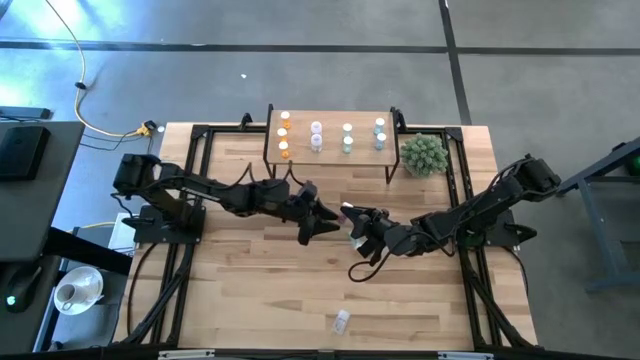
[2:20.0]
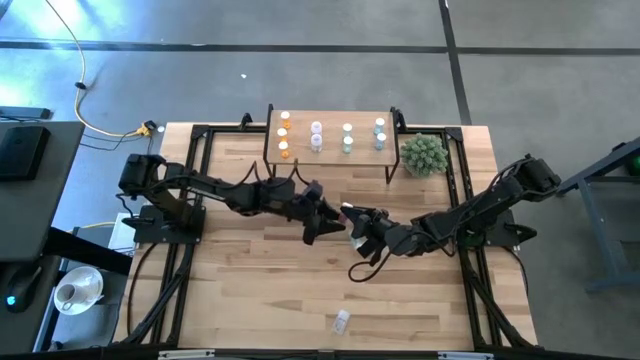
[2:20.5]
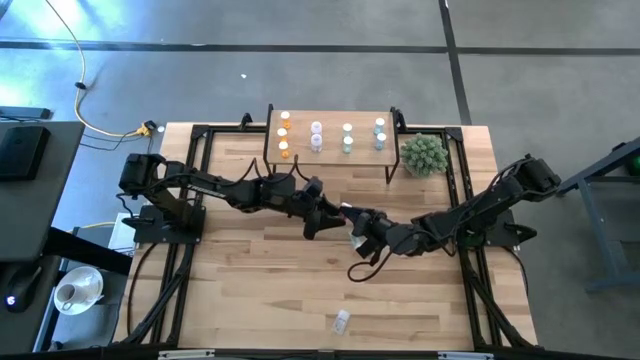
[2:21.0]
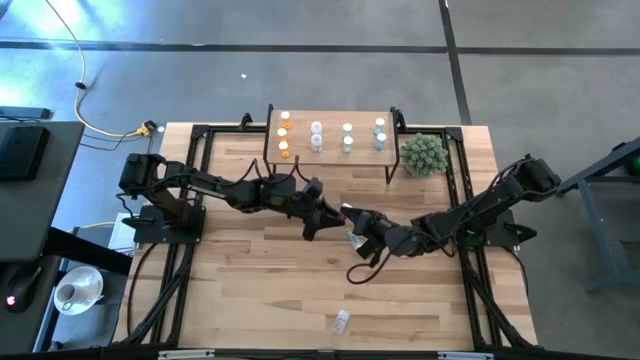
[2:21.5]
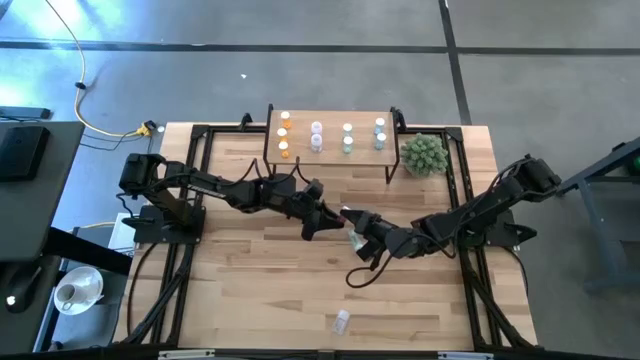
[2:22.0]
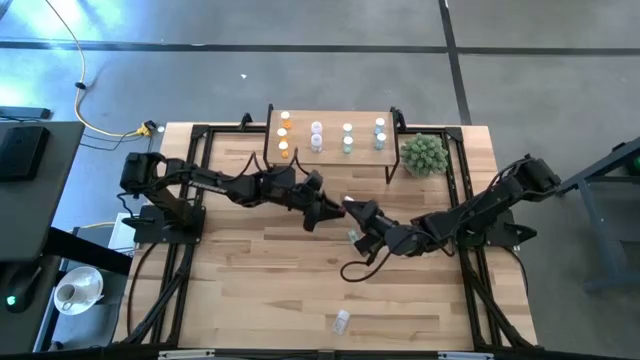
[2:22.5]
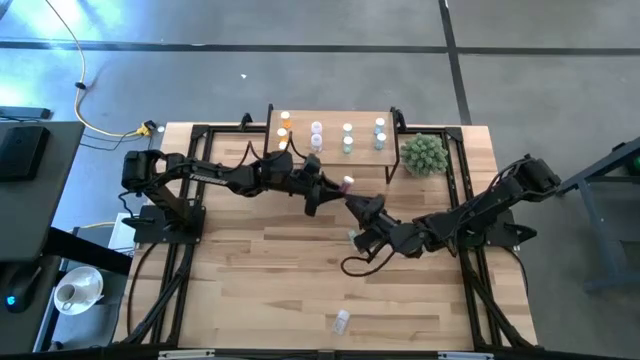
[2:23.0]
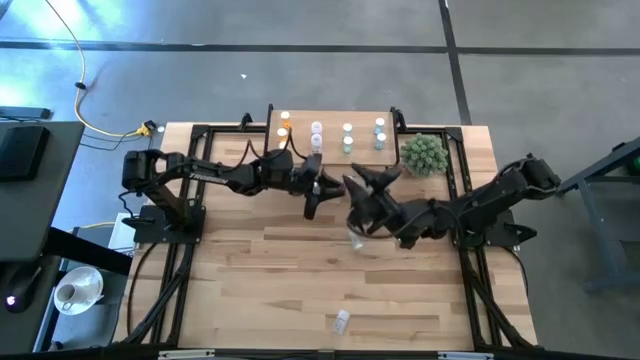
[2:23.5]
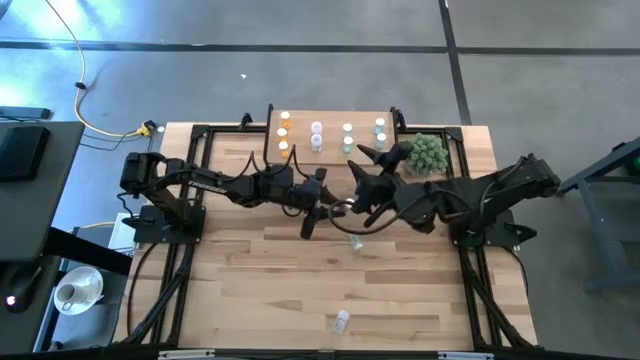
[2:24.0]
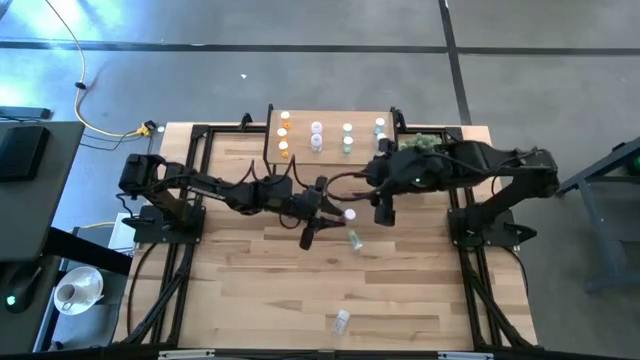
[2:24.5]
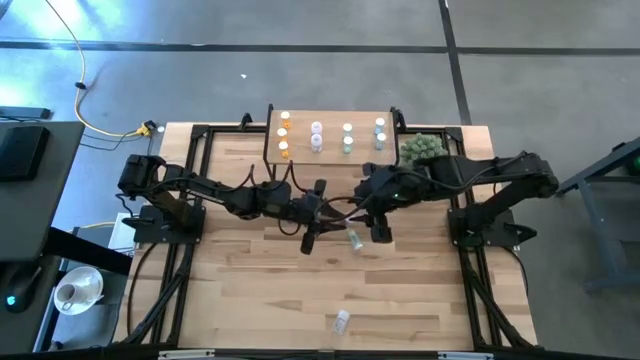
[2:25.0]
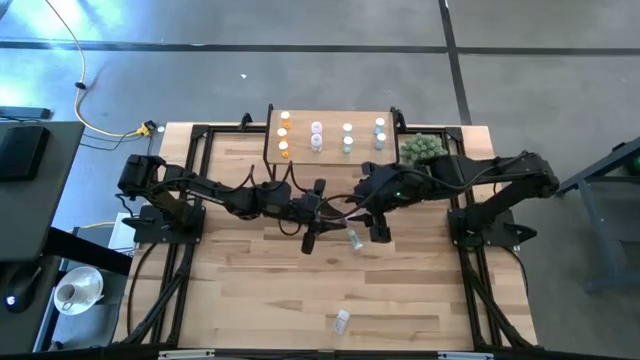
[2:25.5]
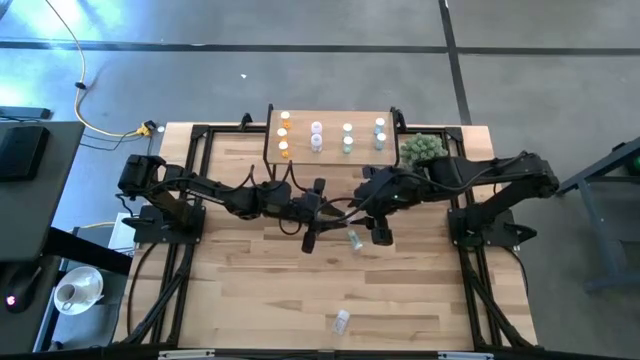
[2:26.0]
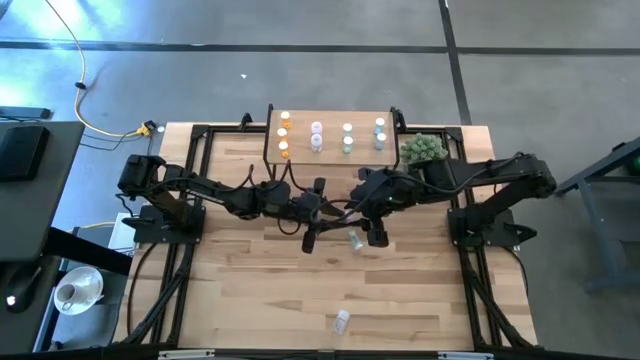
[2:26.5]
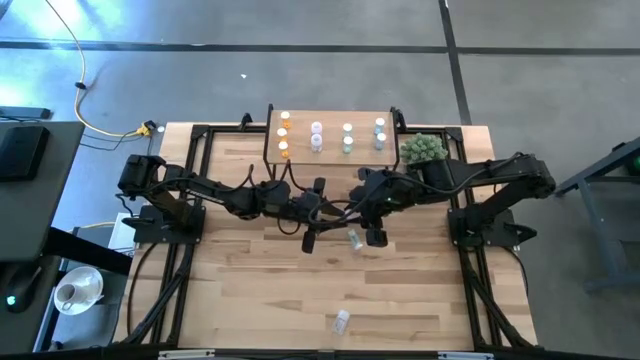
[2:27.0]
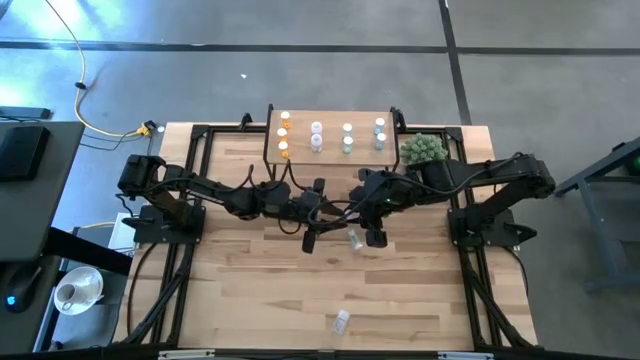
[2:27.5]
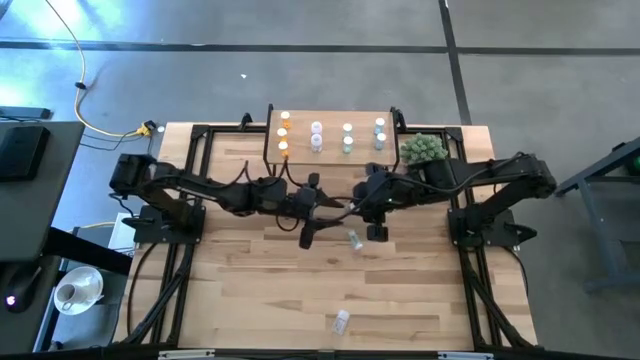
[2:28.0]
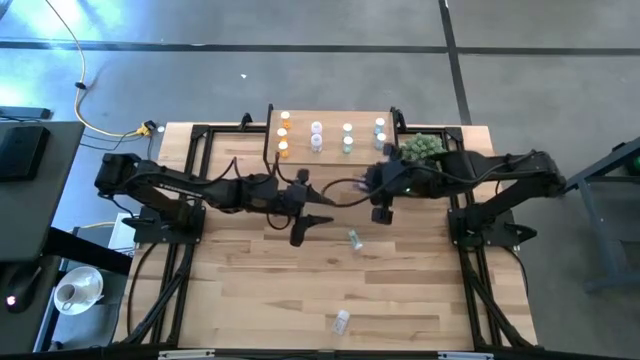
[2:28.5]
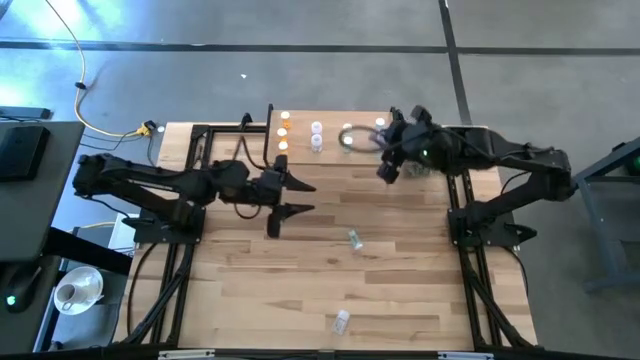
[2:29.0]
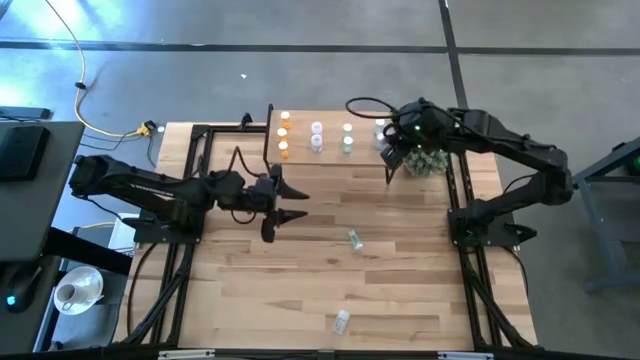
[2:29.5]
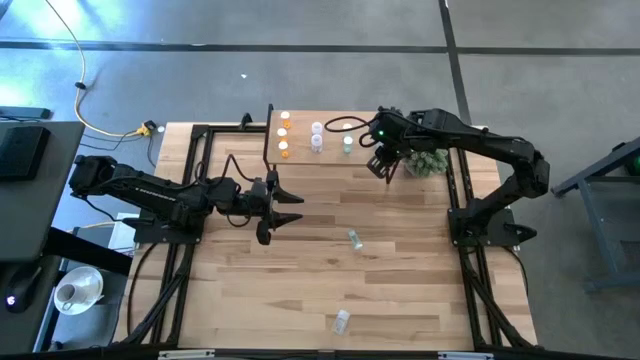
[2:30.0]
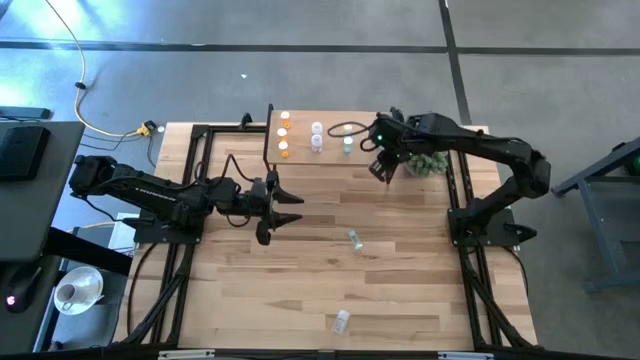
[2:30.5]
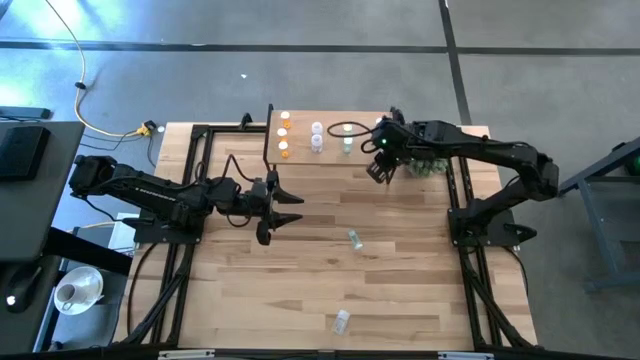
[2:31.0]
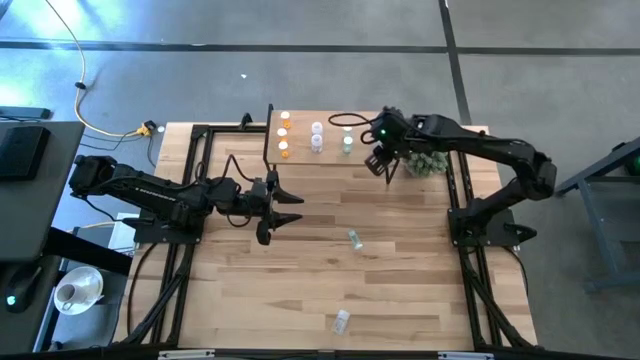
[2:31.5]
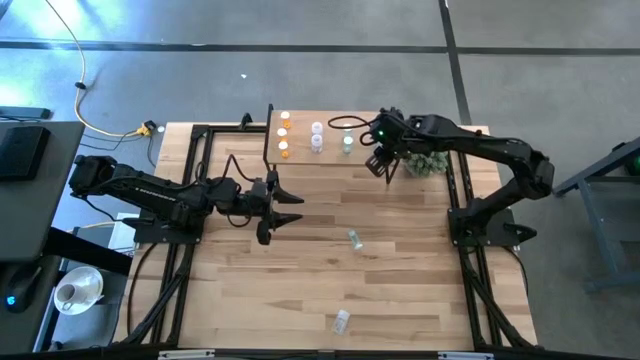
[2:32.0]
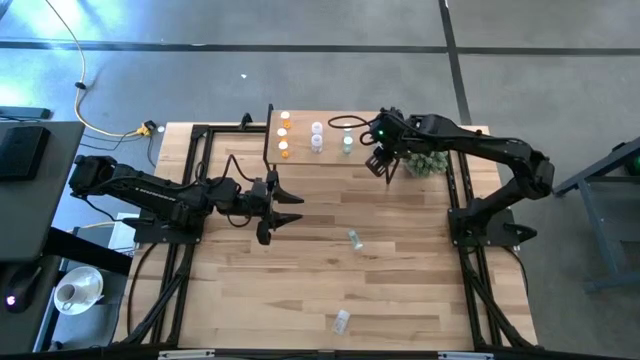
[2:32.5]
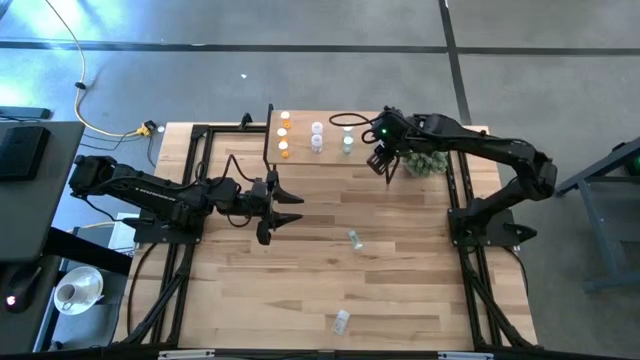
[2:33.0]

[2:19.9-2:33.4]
Task: Pick and place medicine bottles onto shelf by color
Put the blue pill bottle on the shelf and aligned with the other blue pill bottles

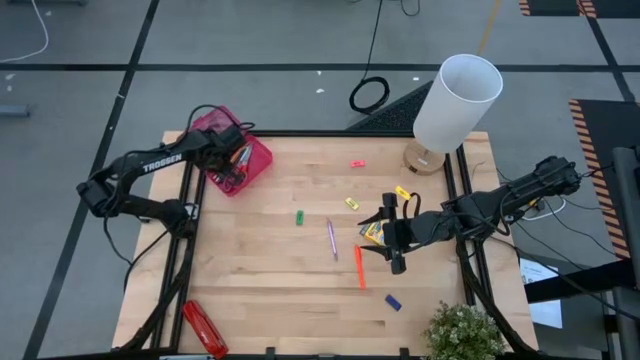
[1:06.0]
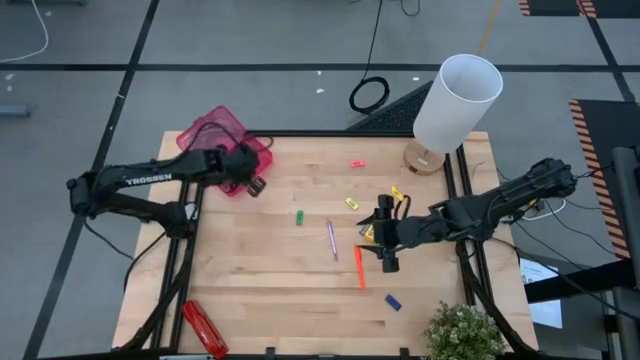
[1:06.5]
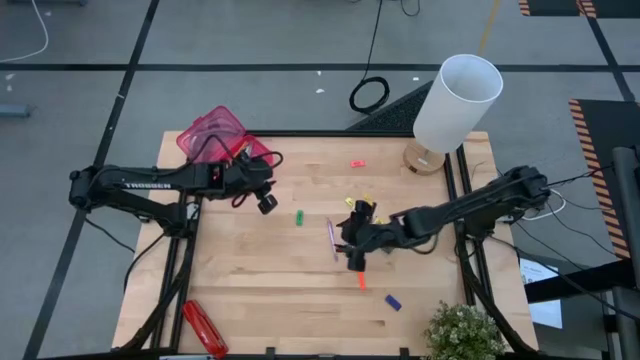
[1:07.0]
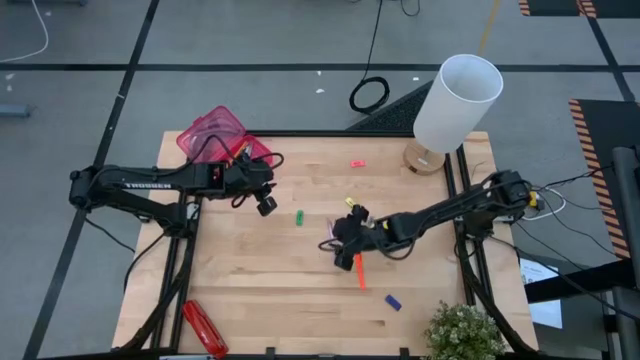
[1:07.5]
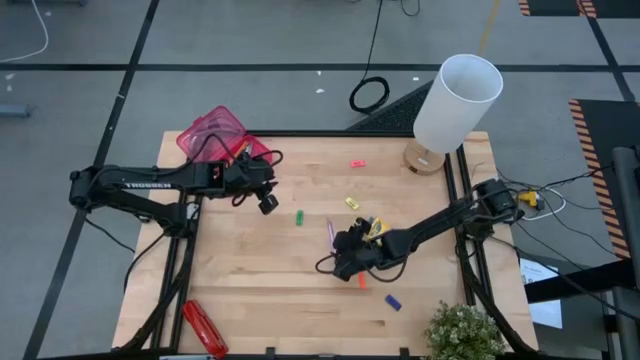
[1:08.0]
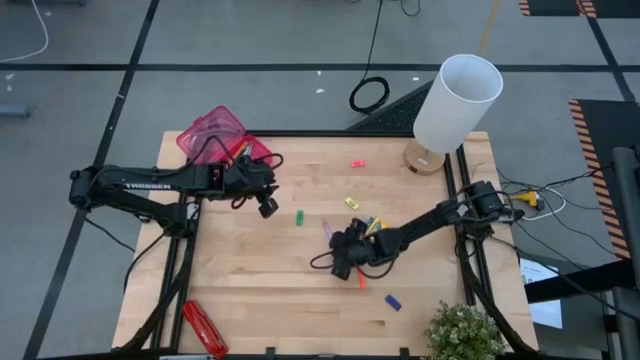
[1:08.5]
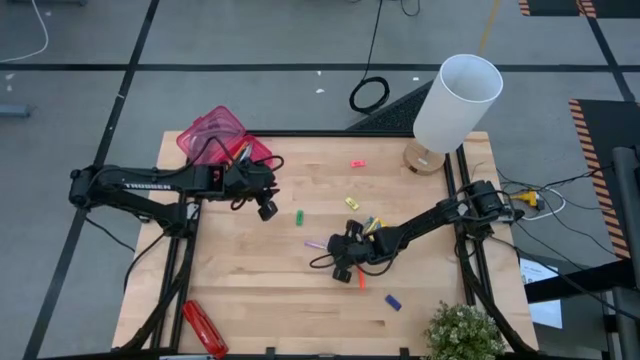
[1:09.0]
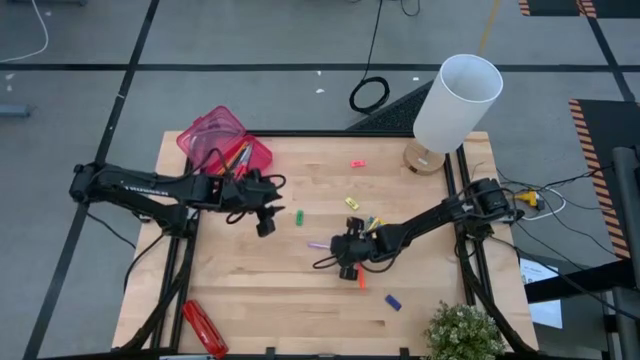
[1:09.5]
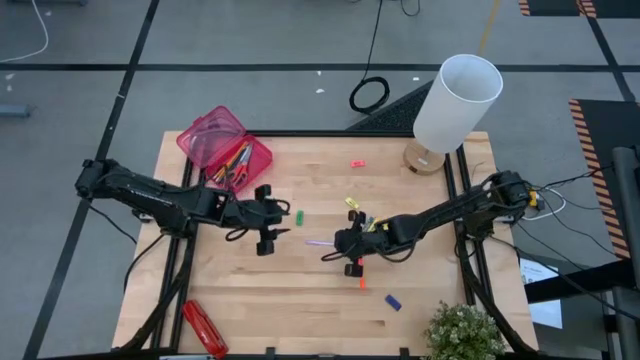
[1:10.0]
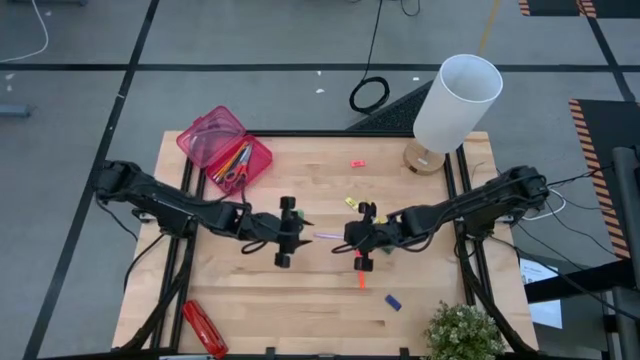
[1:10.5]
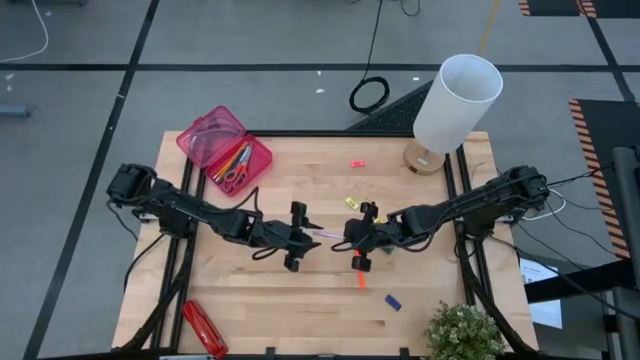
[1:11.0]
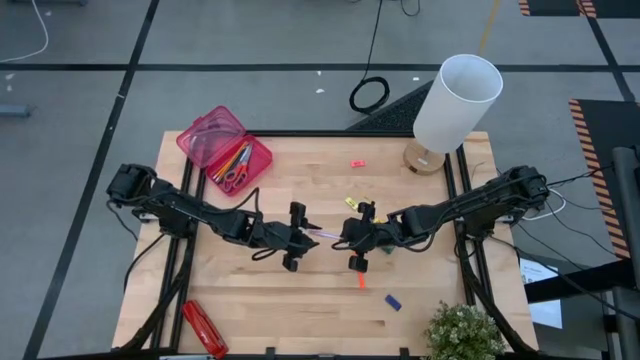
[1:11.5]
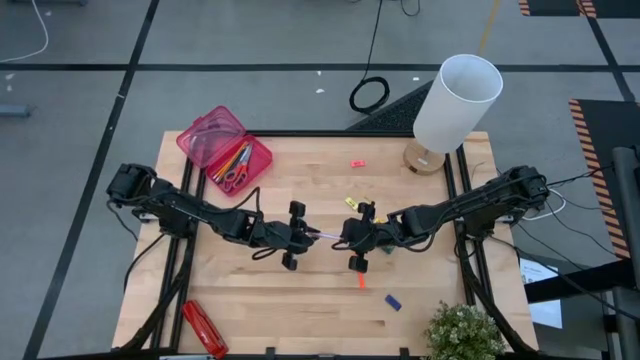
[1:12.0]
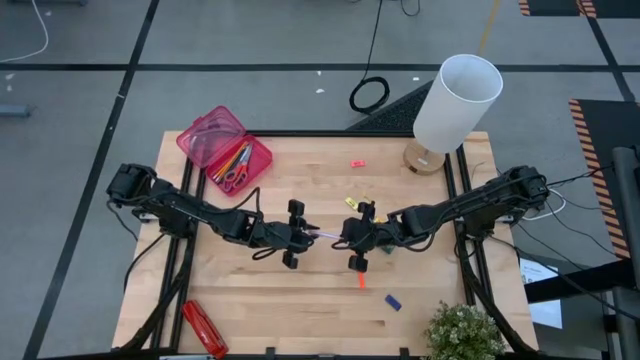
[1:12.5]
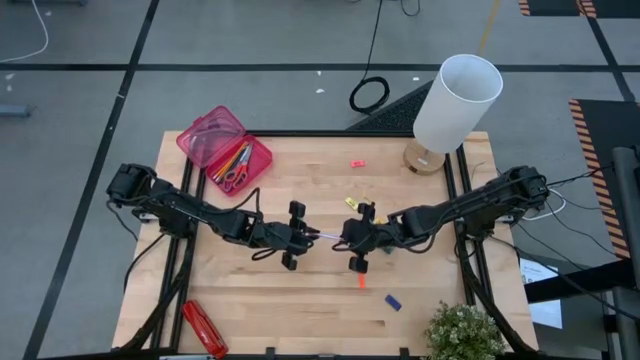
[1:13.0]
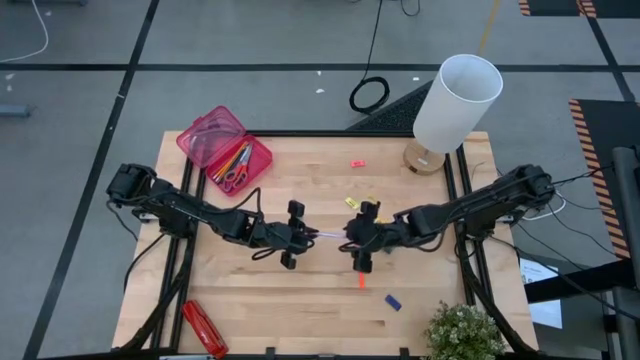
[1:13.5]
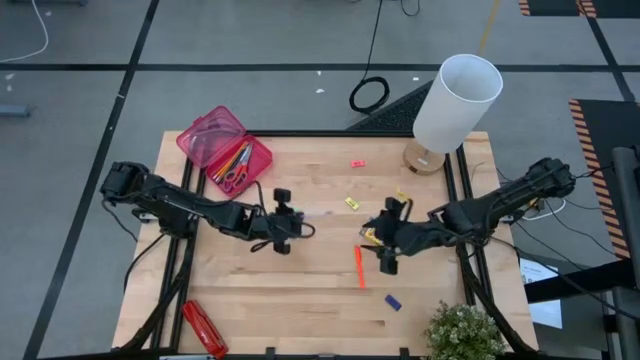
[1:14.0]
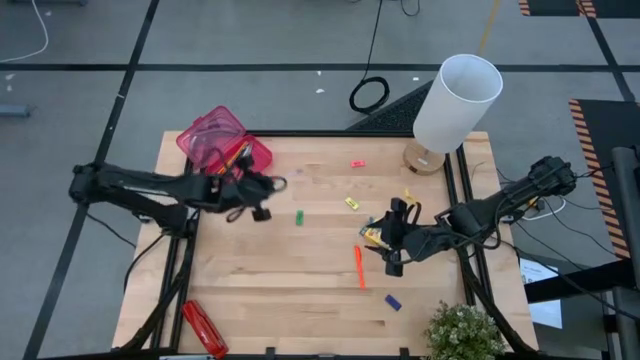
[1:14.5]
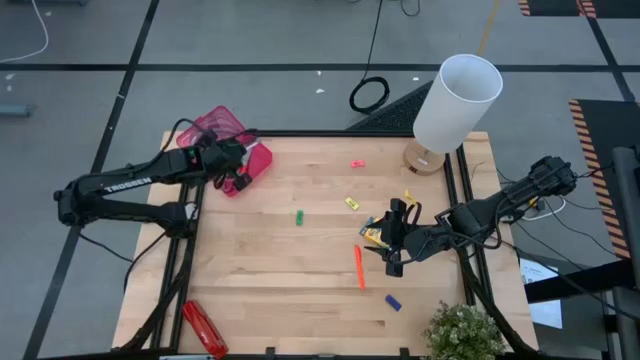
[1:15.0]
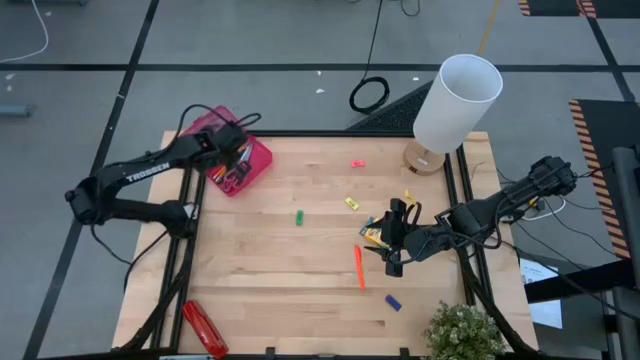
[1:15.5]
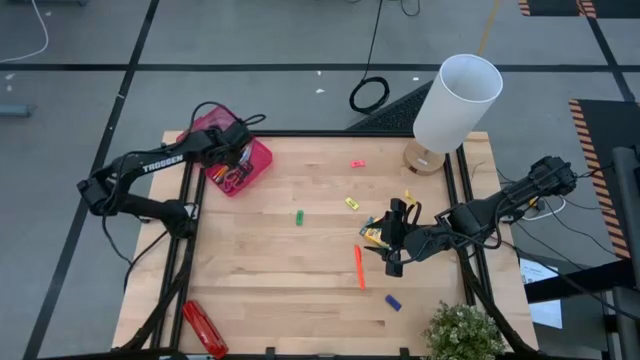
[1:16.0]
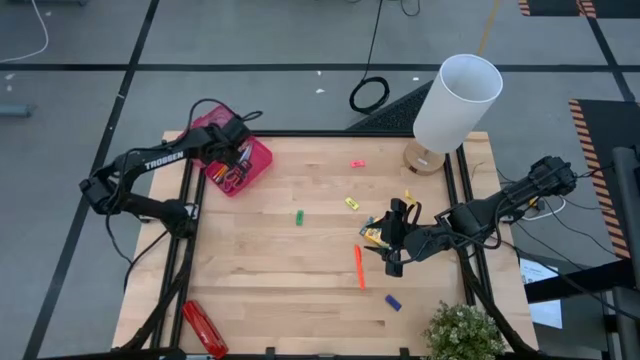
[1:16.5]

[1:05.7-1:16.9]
Task: Pack school essentials
Put the violet pen into the pink supply box
